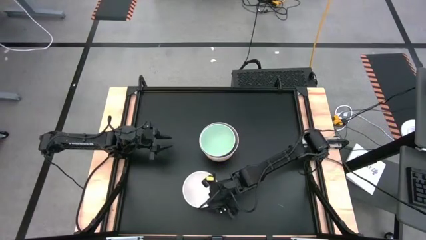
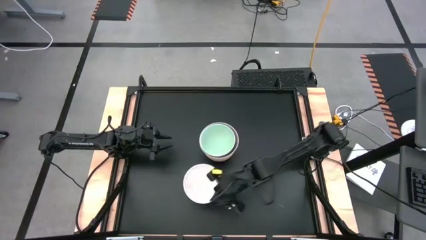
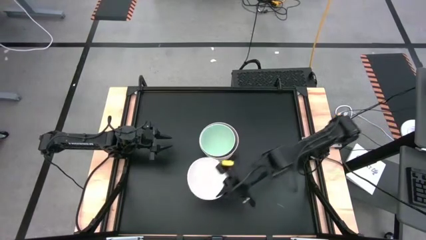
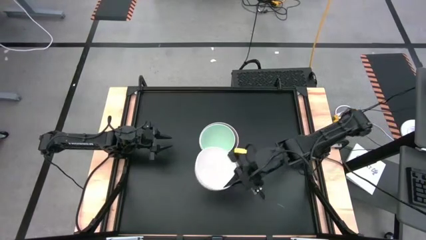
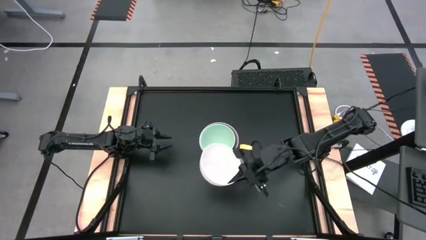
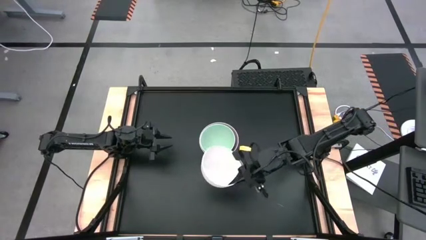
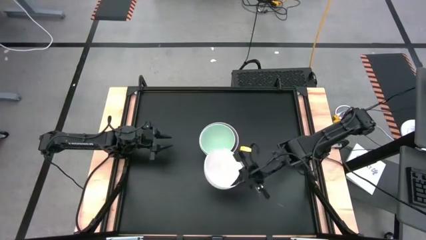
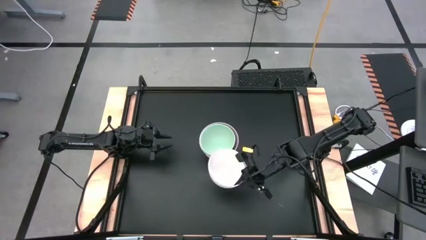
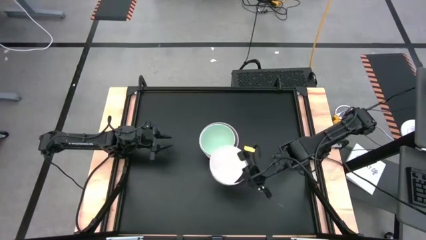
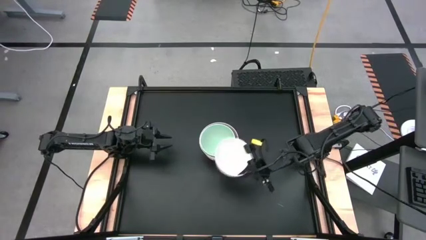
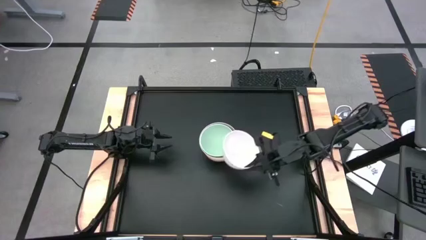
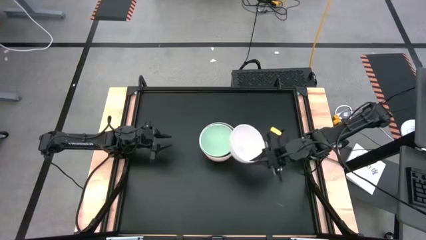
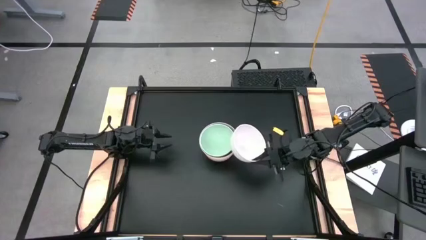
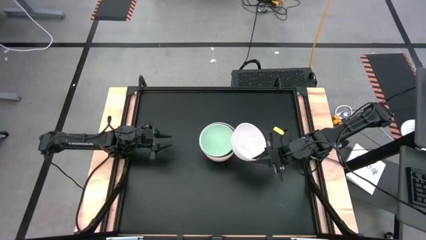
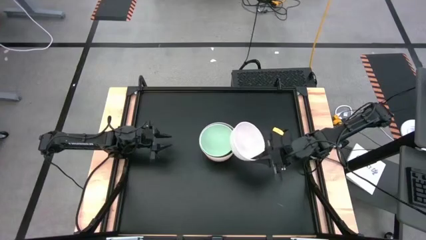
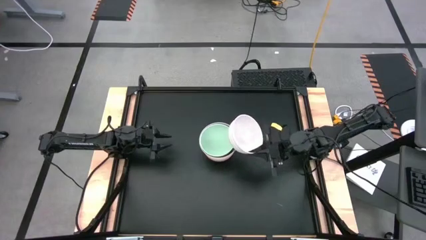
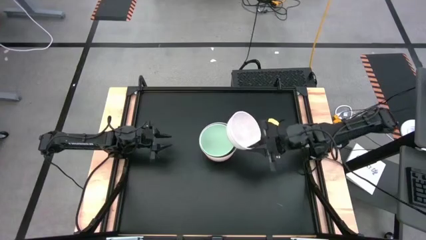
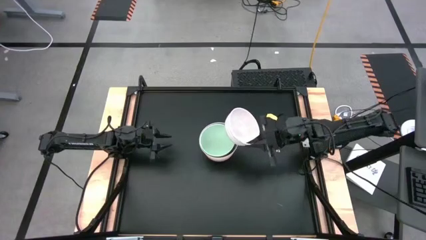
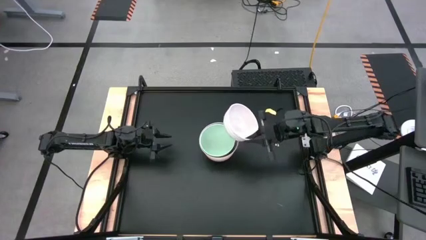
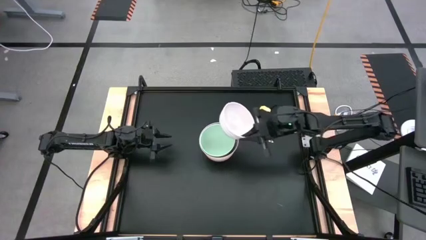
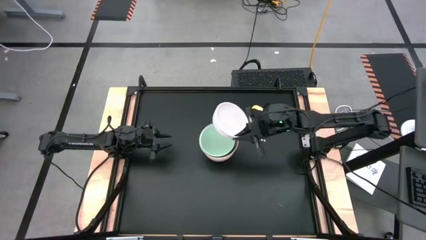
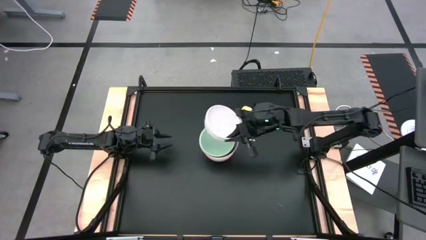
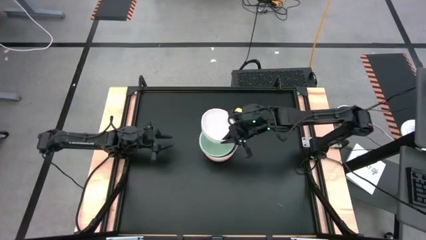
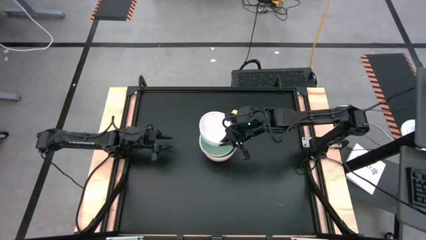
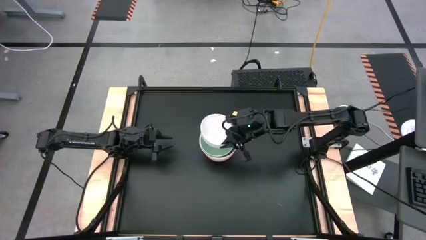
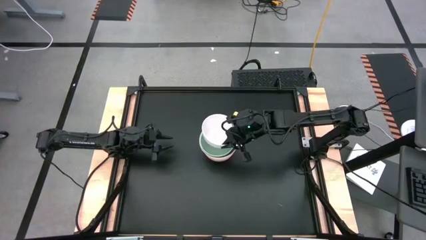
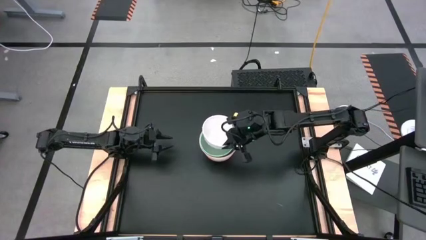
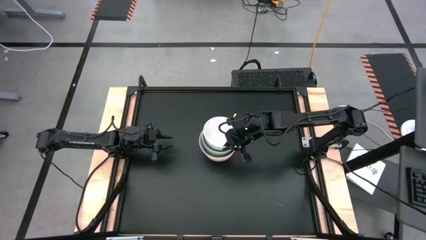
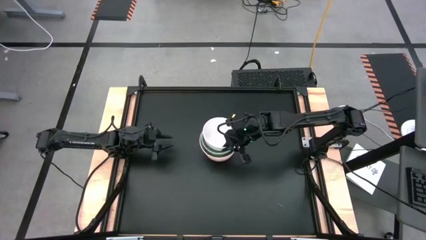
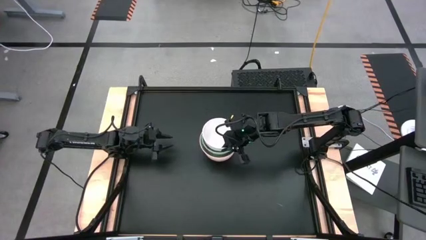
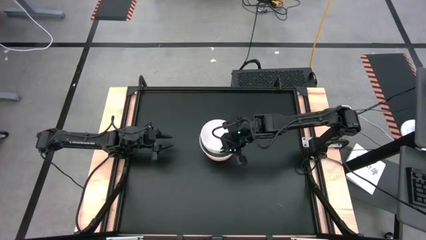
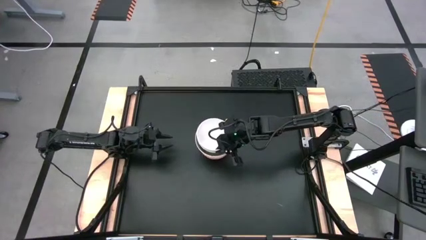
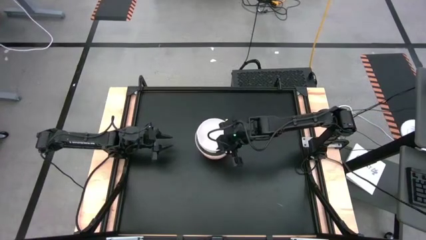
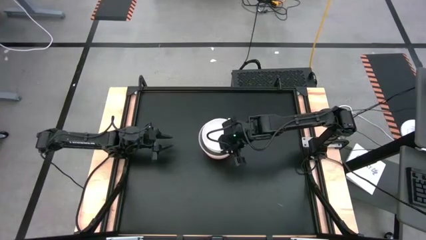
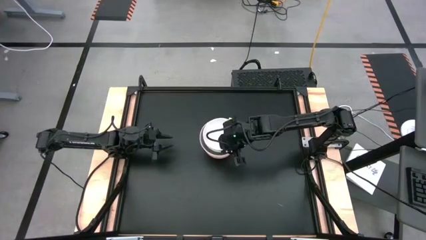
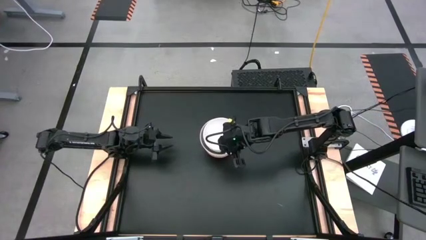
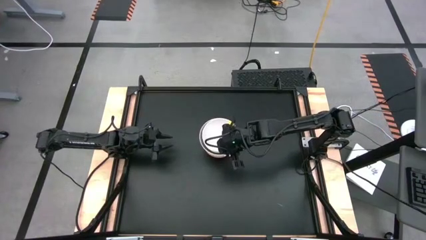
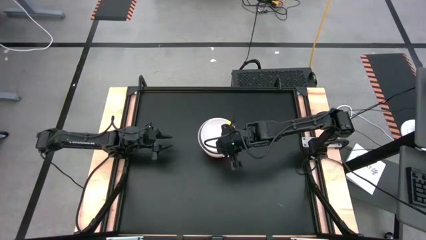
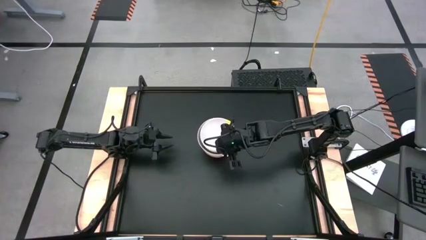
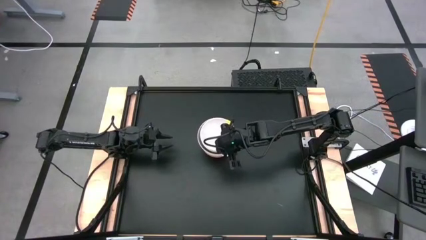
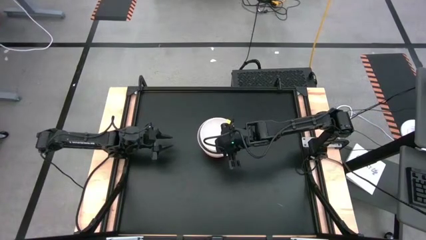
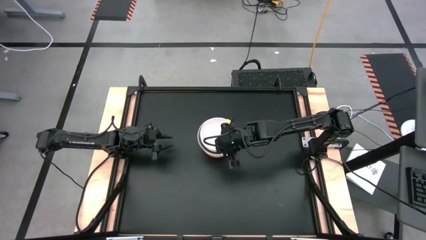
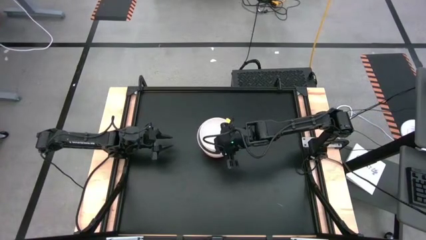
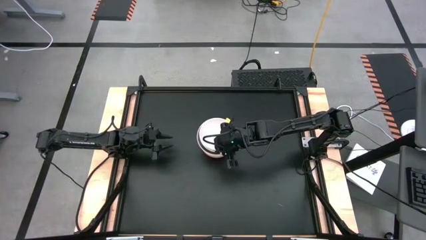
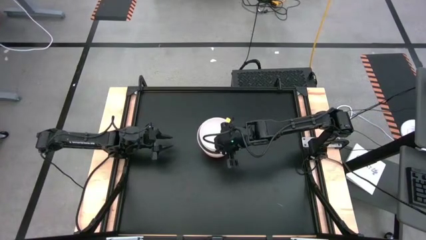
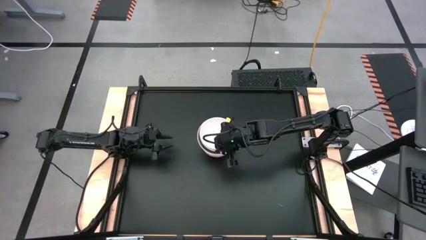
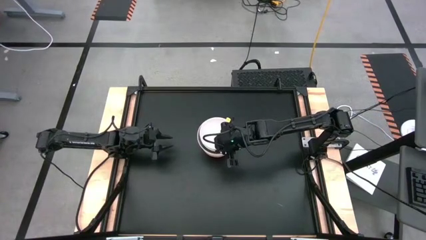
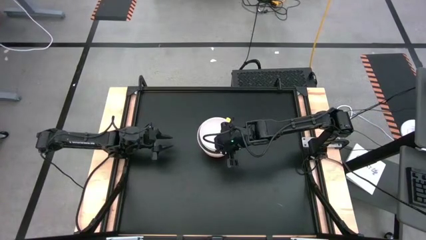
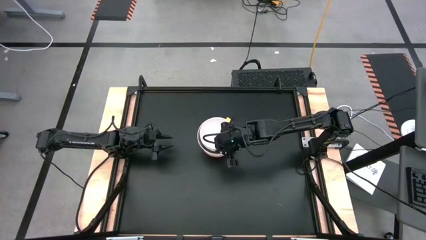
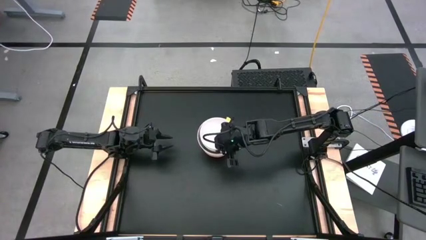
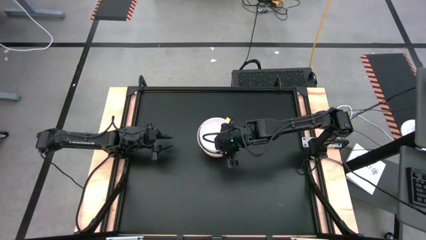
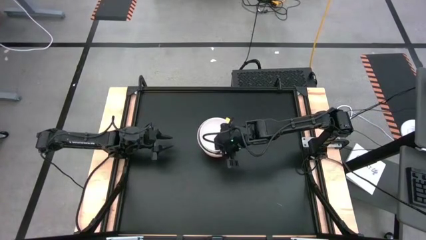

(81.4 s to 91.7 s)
Task: Nest bowls inside each other
Stack the white bowl on top of the light green bowl

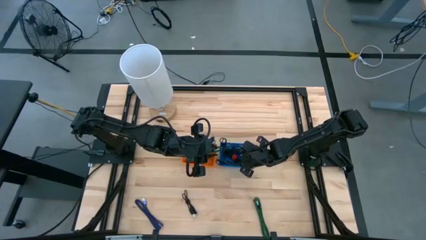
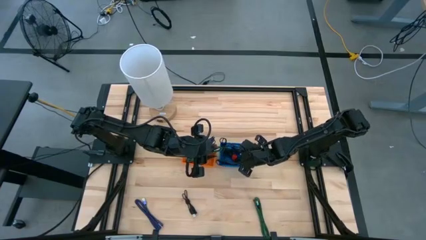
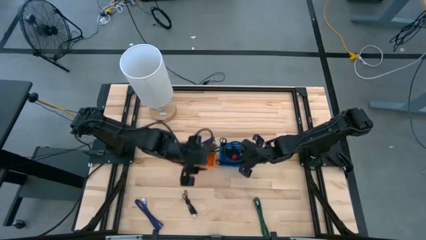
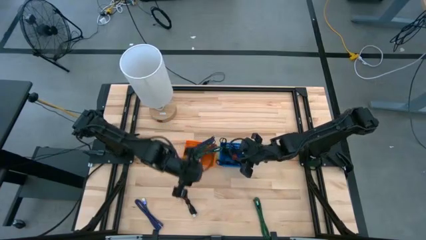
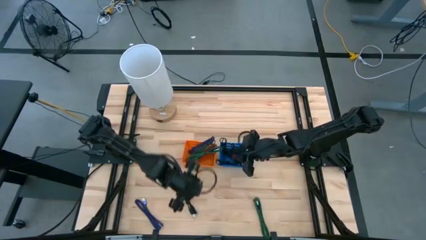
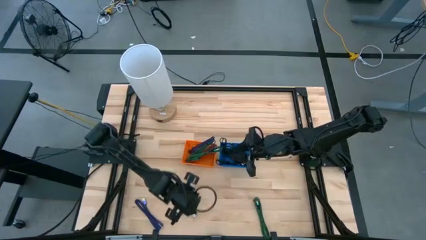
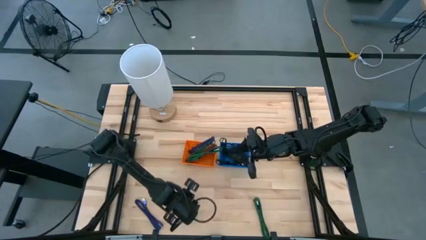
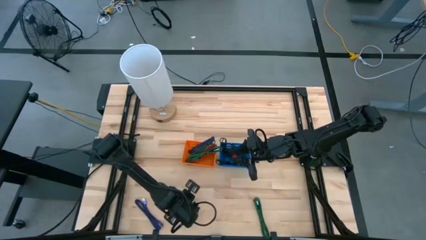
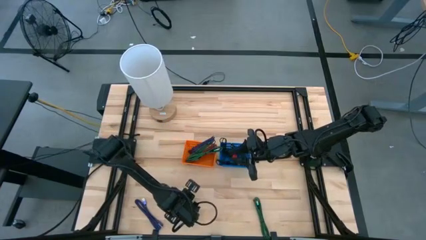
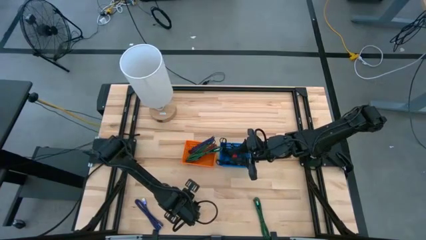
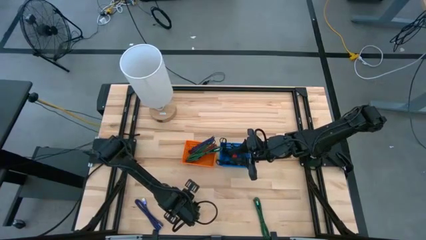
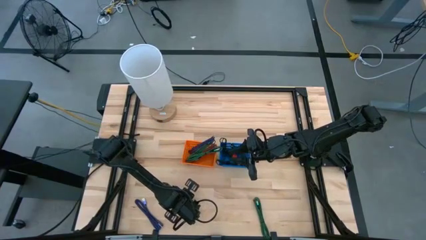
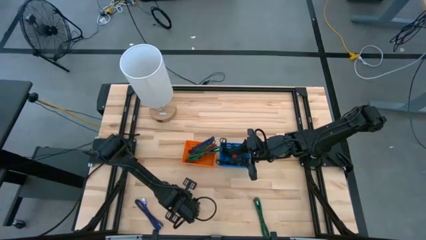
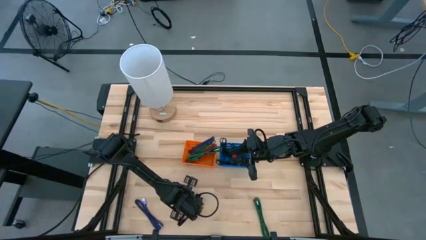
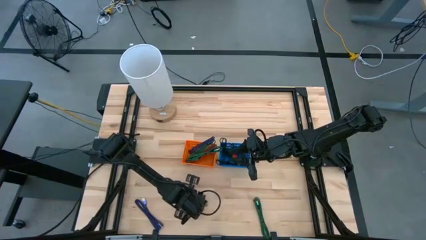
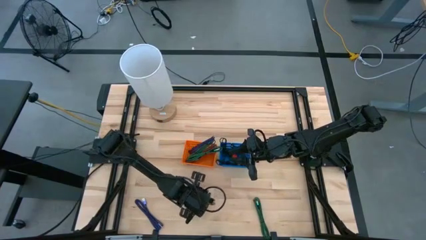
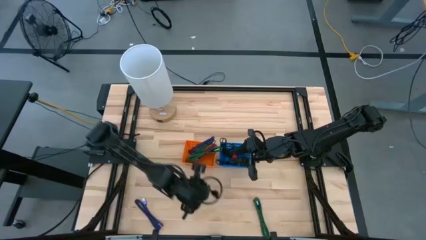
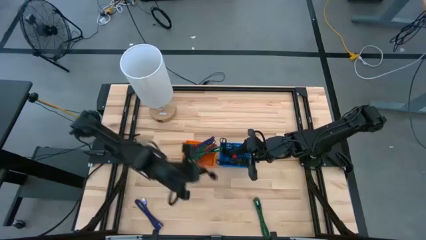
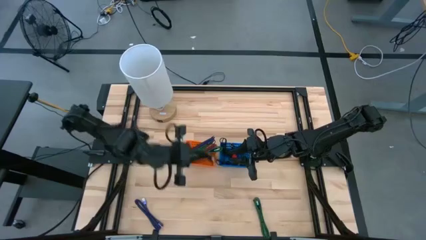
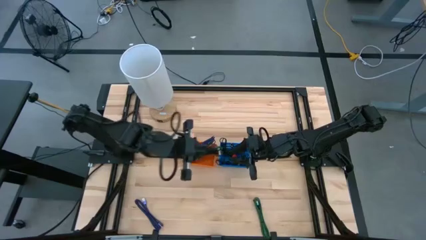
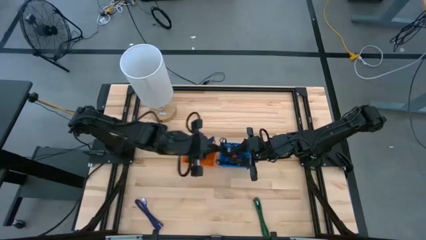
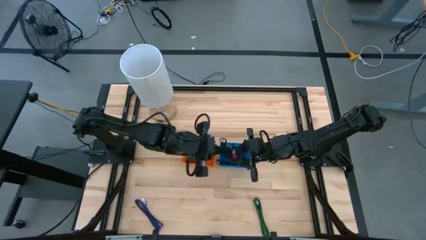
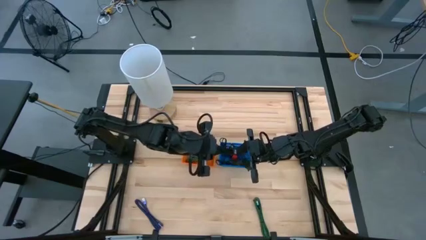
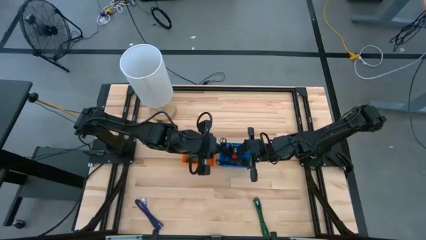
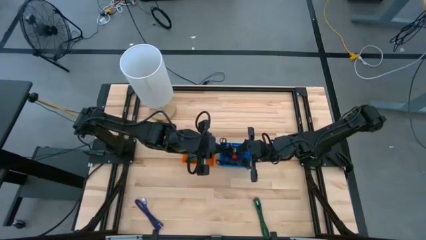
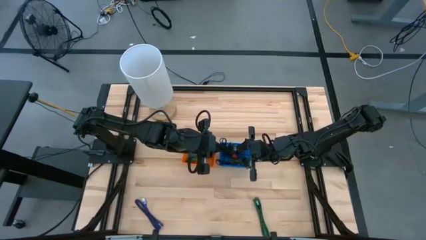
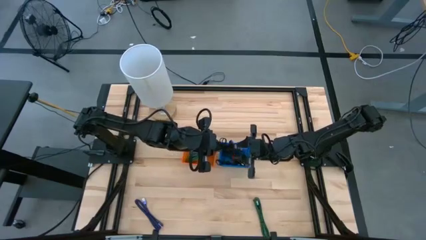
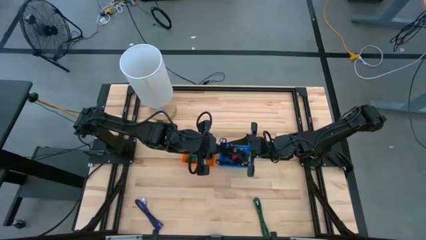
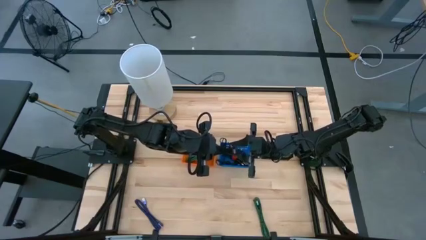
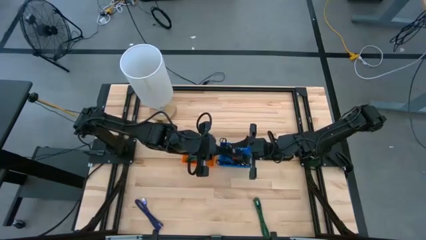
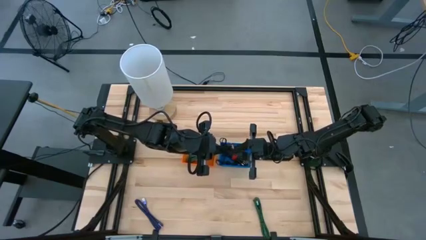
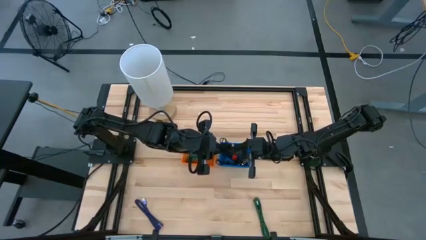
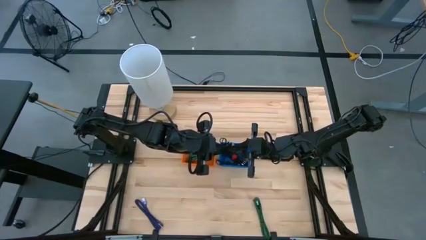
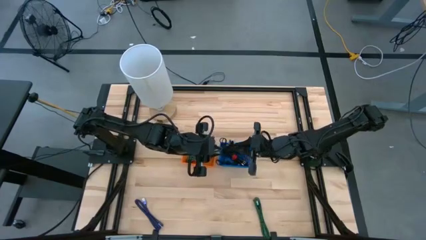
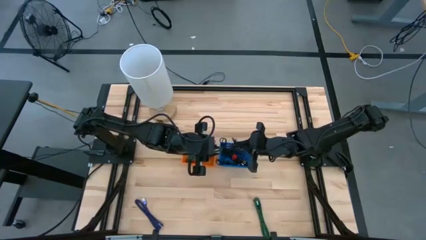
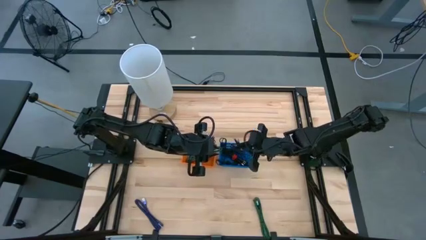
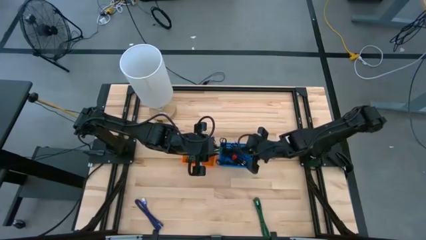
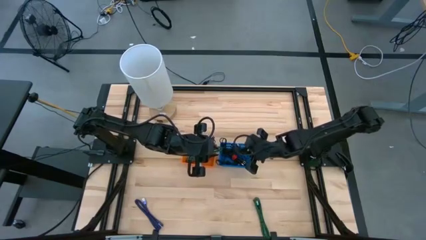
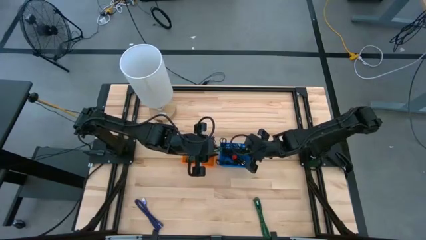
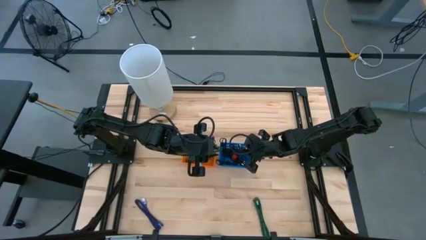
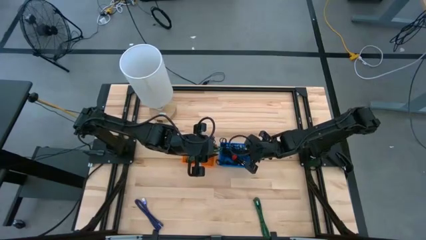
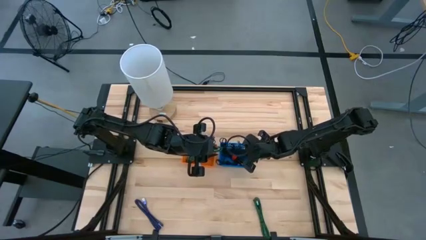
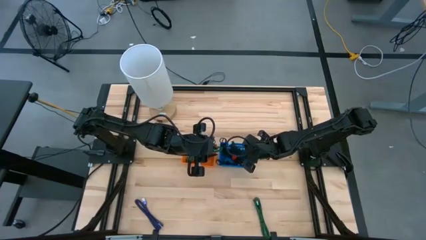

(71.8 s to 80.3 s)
Task: Pick & Place USB Port
Put the black charger cable into the blue bin
